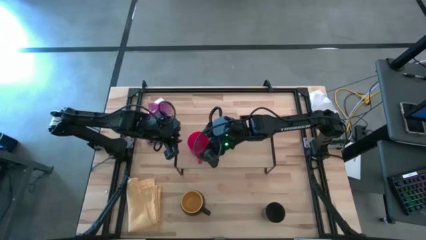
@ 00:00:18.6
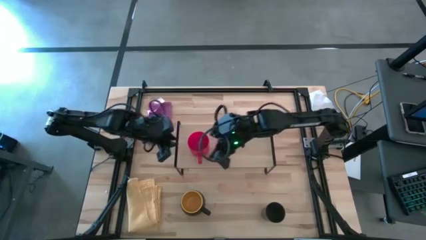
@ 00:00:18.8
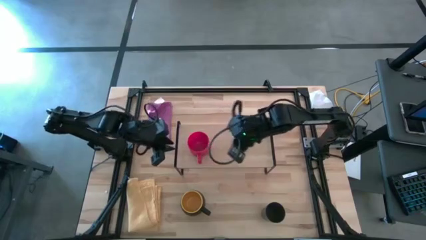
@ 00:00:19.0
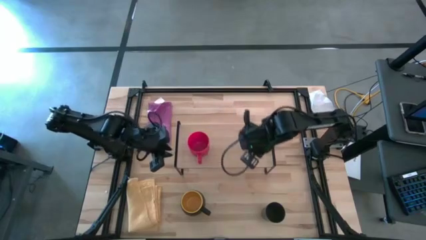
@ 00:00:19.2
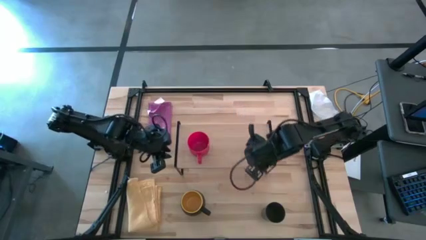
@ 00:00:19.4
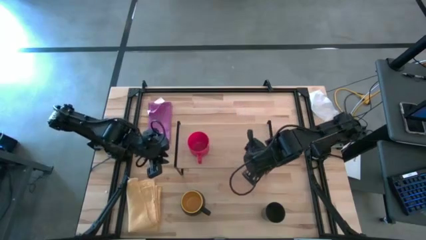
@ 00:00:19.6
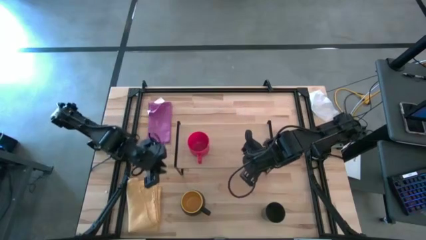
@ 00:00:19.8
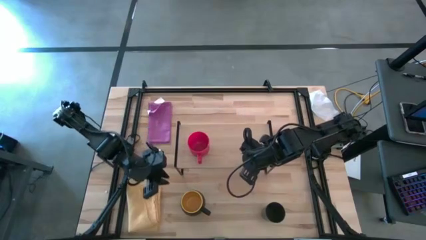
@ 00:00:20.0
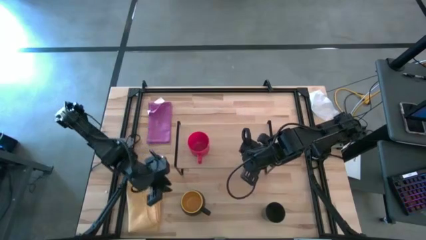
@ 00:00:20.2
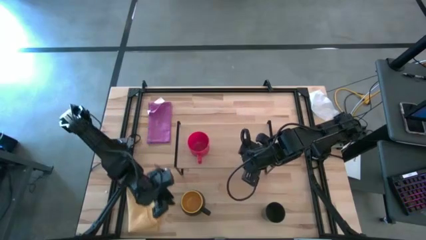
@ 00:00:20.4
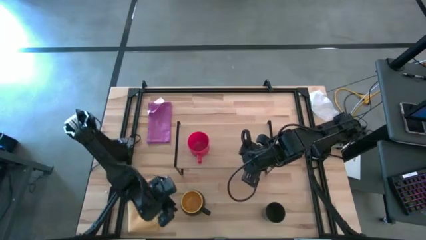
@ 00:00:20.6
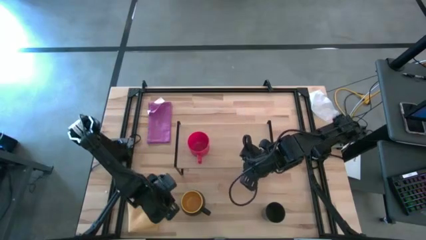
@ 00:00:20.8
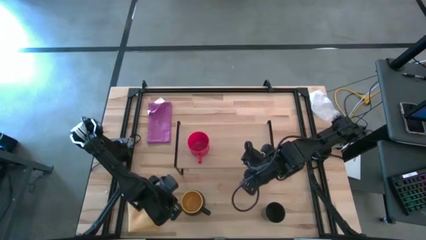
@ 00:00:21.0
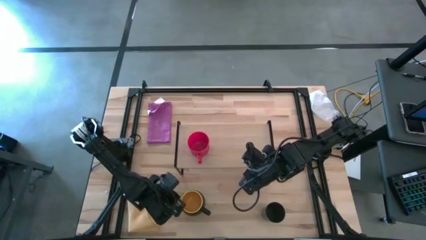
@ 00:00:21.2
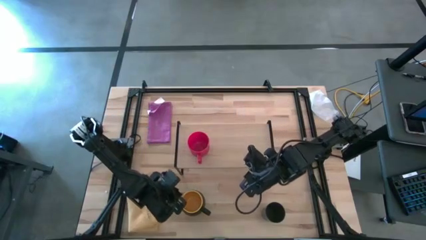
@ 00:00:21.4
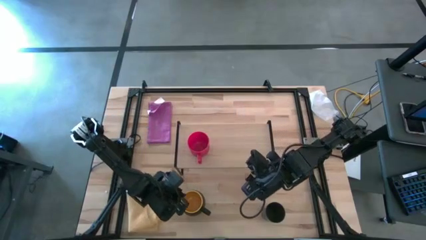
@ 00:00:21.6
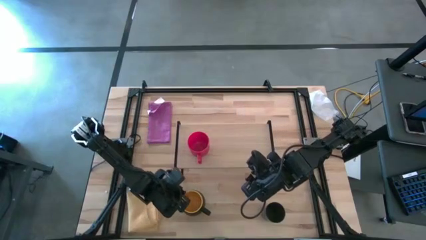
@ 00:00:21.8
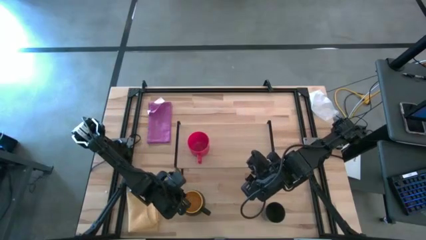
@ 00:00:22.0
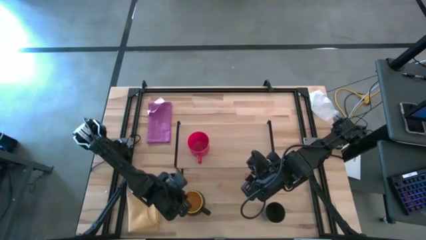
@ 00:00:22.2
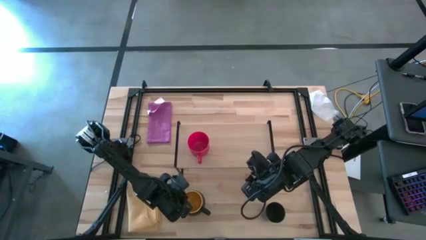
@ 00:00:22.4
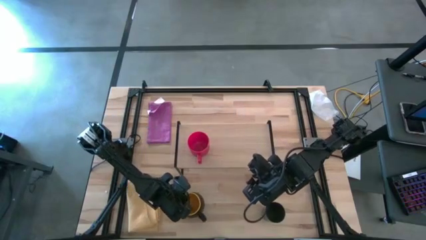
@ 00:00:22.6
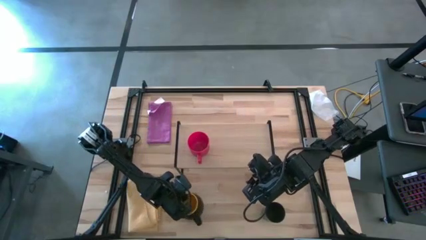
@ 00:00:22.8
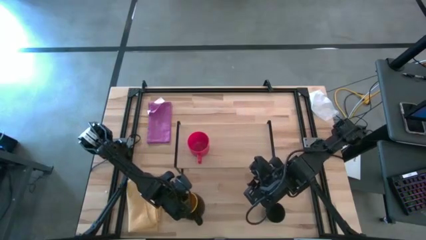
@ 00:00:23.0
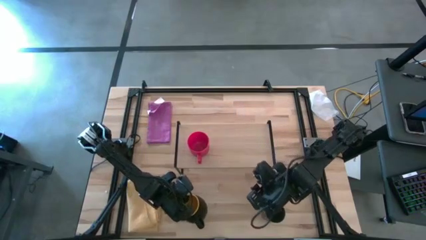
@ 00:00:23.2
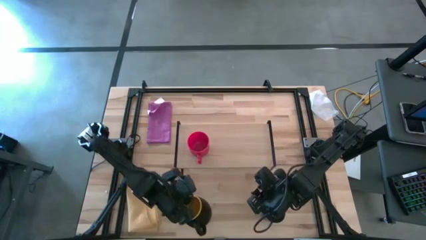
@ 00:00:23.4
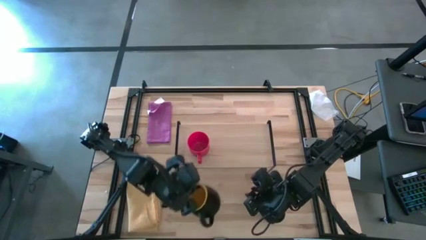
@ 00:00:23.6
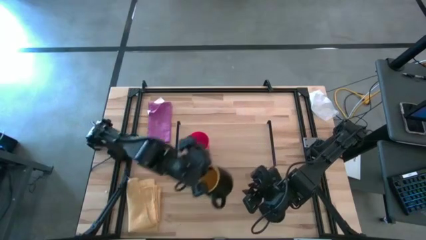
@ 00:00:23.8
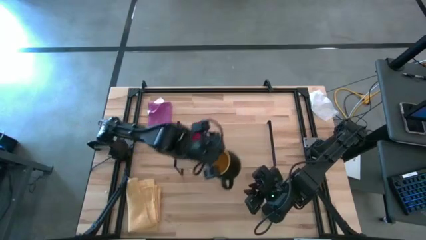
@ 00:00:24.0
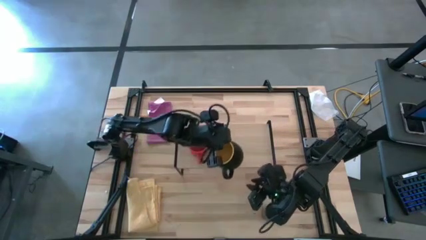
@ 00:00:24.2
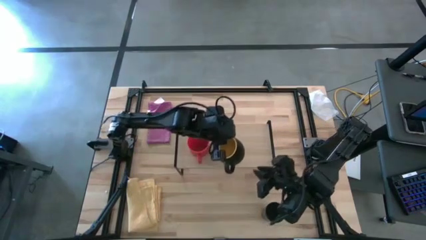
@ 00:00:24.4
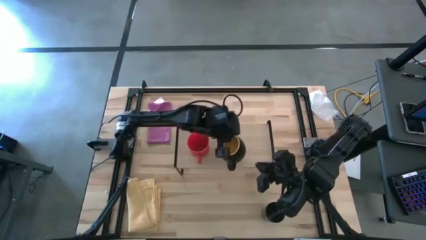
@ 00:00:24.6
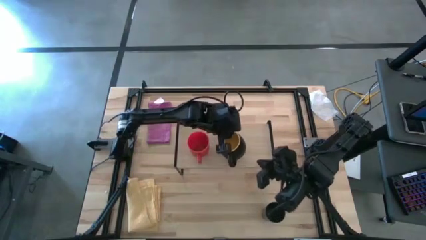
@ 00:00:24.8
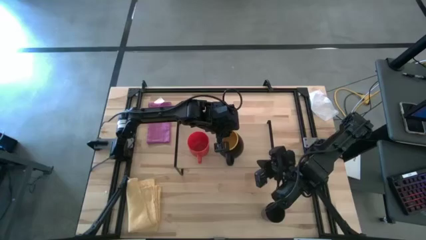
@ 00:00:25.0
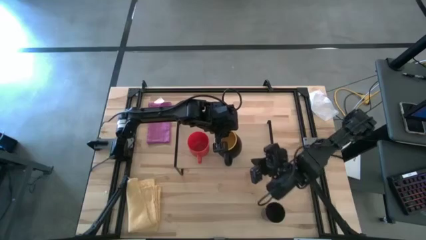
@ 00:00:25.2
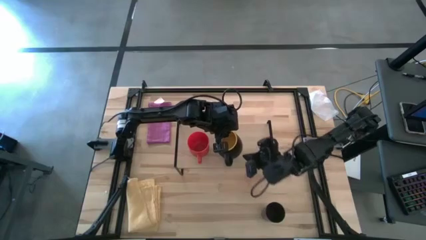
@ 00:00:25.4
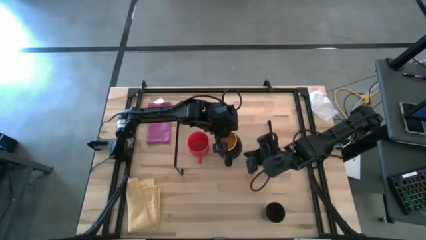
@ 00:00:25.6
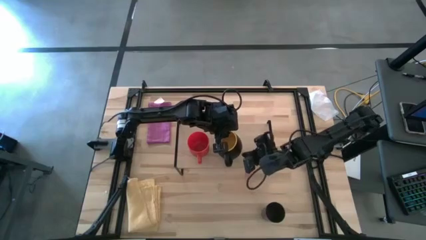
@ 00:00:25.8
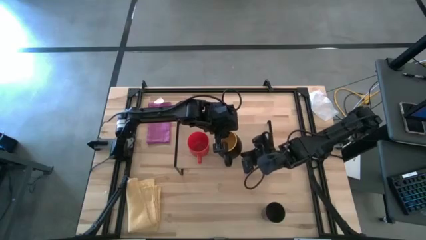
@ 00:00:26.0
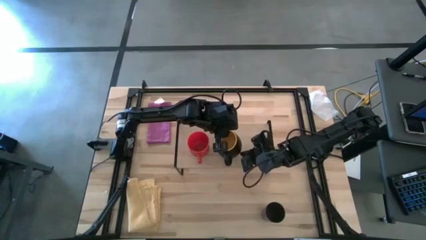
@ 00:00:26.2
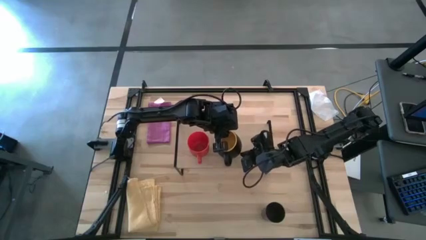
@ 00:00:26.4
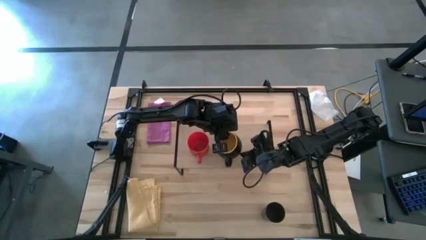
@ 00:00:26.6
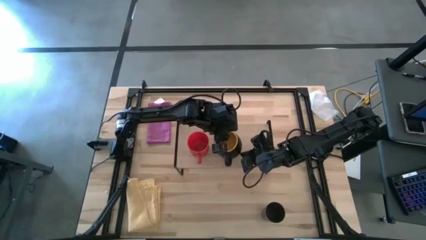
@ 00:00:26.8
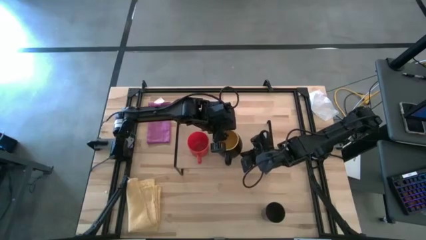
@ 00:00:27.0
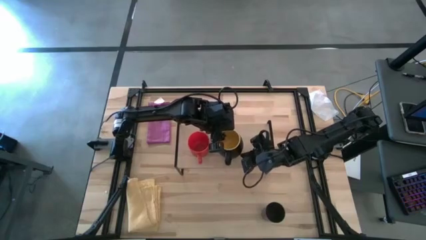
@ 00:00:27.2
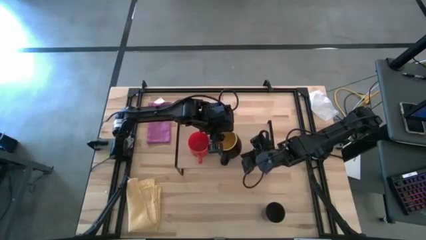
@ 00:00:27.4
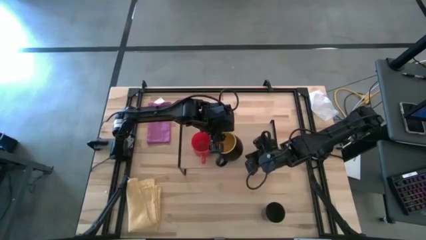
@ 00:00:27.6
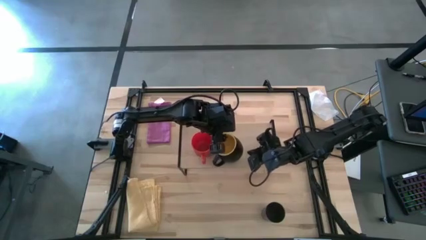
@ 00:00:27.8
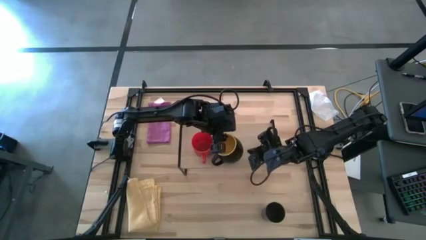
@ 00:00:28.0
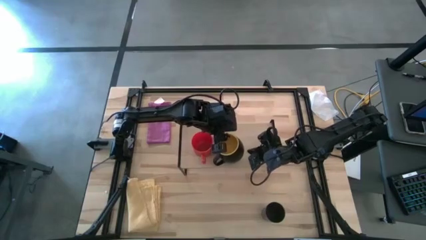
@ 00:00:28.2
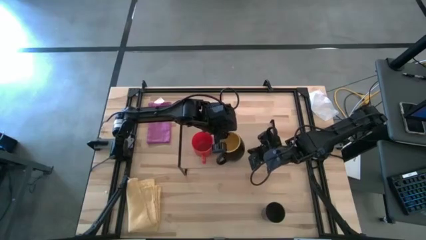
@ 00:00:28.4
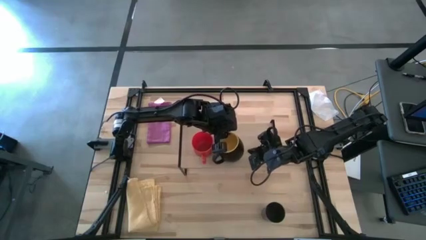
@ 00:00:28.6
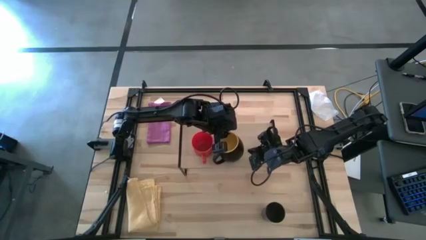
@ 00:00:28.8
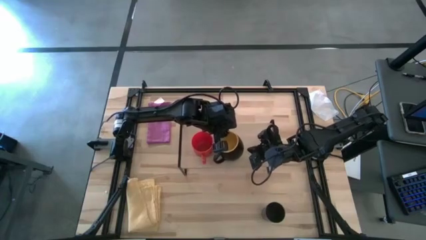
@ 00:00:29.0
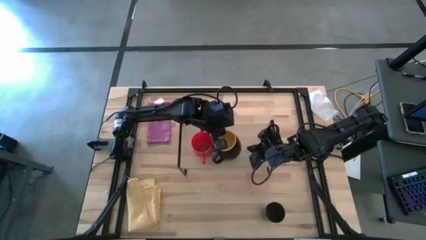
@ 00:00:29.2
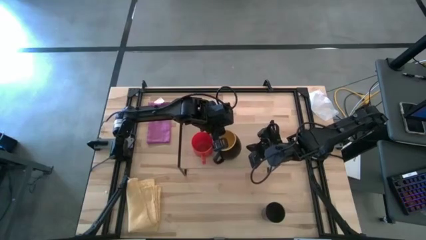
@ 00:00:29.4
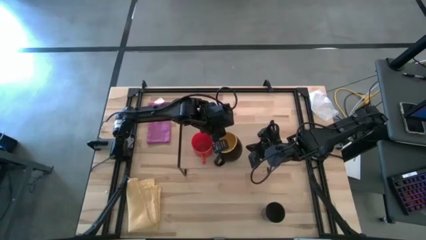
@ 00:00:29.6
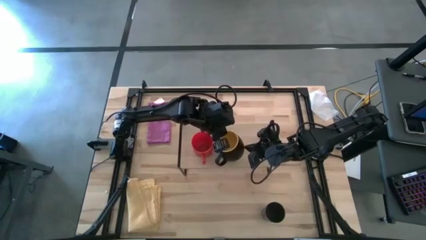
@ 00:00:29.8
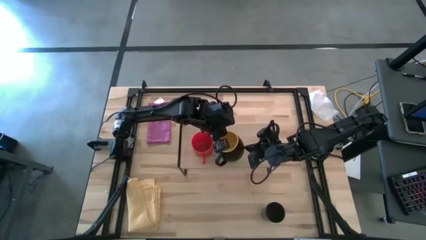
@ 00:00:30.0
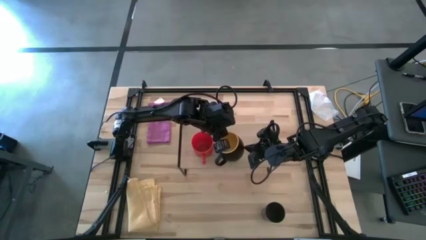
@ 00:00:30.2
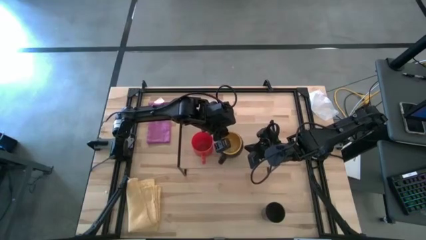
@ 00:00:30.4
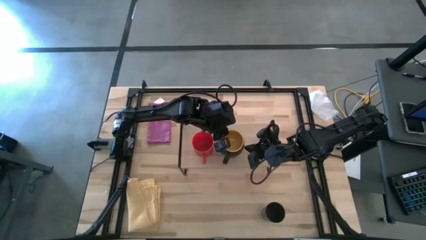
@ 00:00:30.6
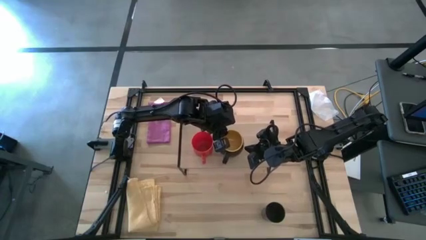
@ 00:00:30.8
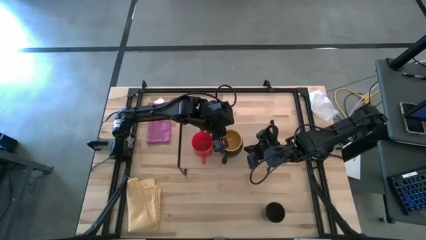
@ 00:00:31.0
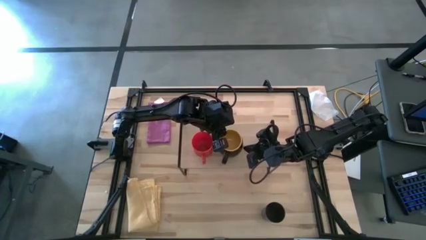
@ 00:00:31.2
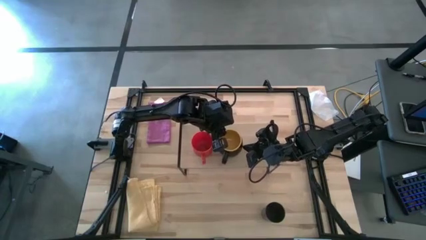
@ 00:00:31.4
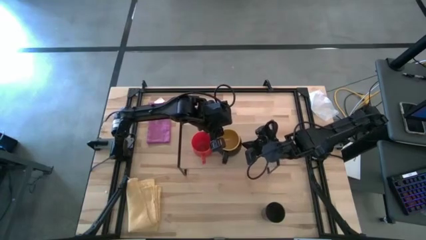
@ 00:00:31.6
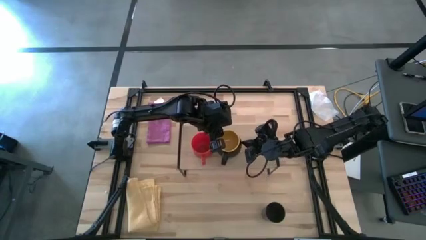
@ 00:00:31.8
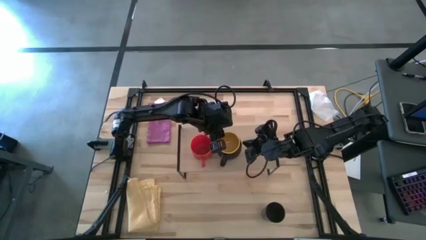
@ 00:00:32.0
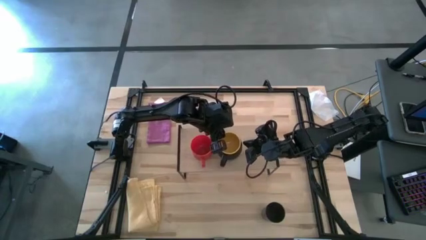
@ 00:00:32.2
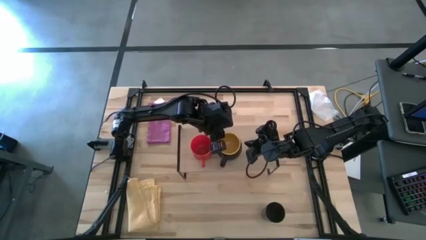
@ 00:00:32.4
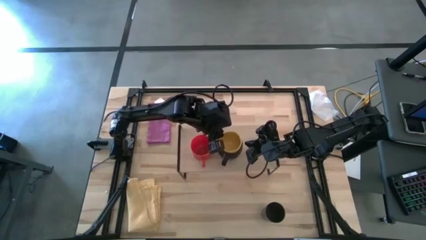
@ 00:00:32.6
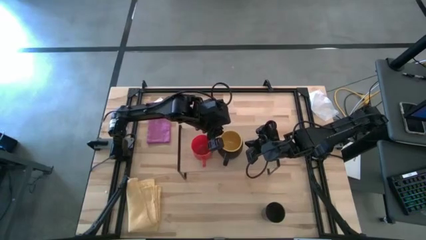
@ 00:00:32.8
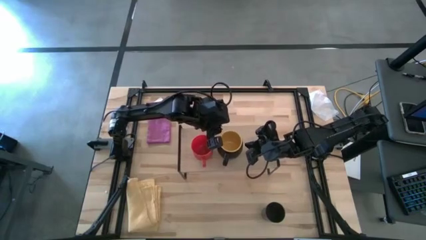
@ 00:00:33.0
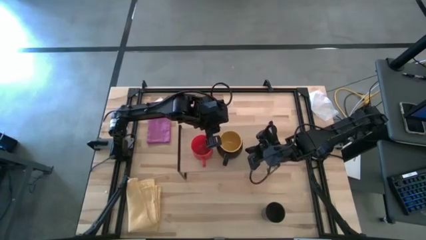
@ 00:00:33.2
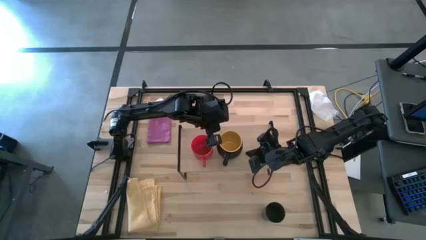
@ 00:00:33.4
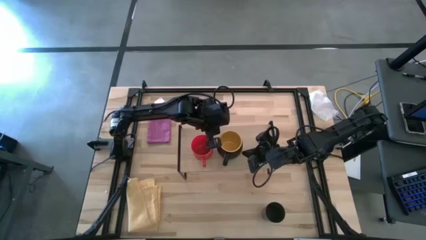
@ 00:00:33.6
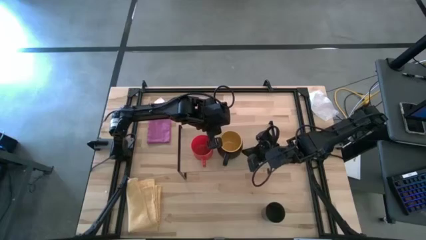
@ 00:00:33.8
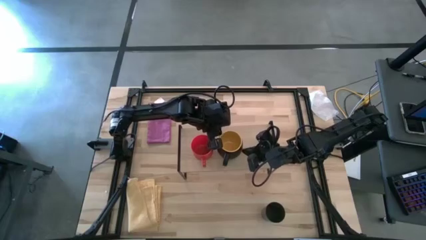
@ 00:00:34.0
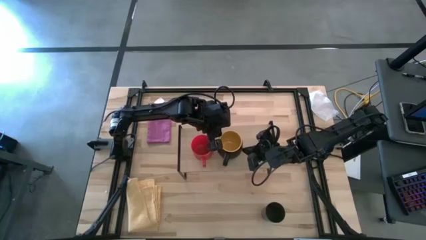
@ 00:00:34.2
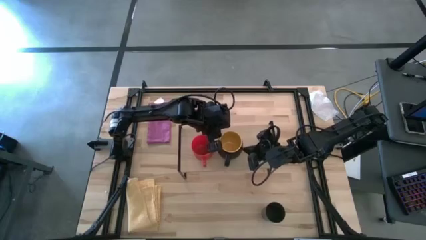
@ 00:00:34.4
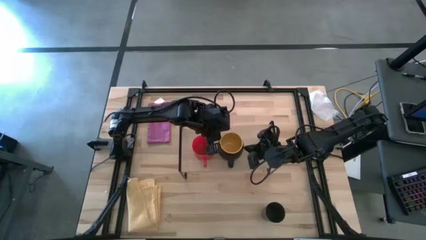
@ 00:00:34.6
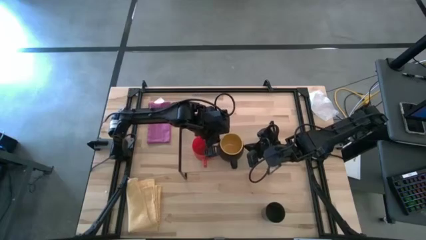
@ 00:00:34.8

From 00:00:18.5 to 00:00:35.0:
Task: Stack small to large cups/mugs on shelf
Put the black mug on the shelf
